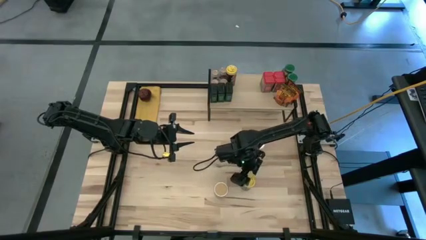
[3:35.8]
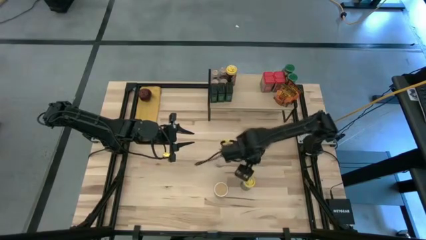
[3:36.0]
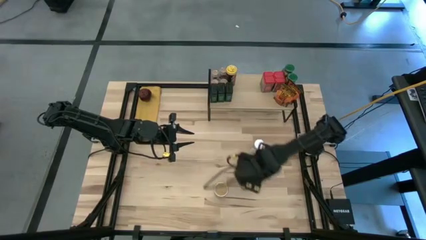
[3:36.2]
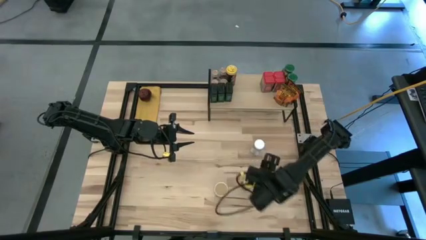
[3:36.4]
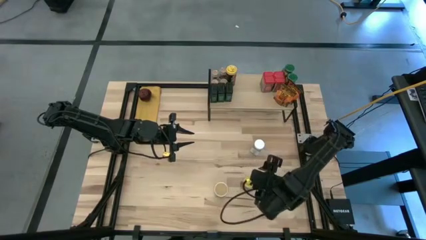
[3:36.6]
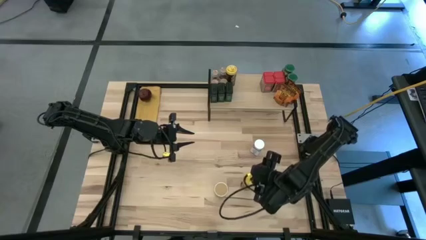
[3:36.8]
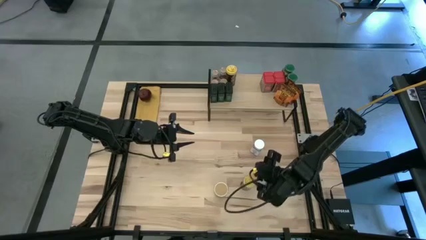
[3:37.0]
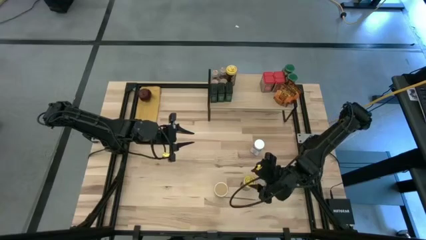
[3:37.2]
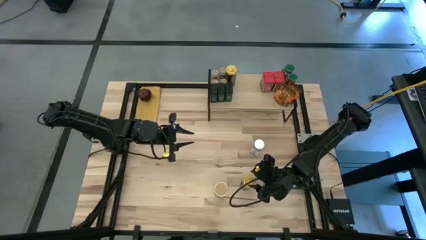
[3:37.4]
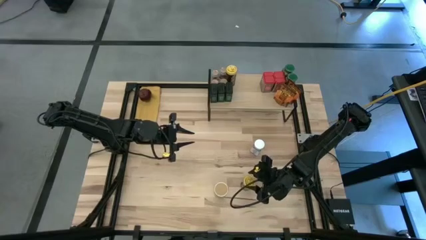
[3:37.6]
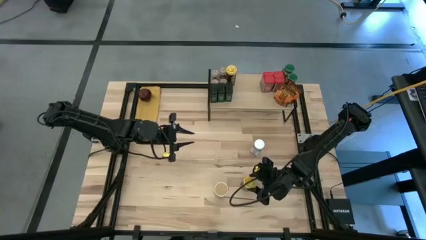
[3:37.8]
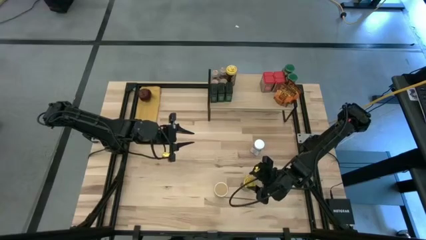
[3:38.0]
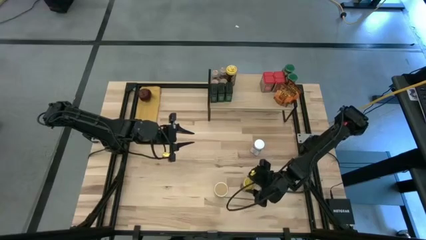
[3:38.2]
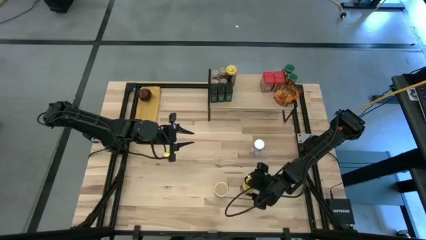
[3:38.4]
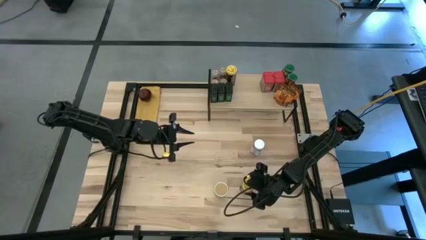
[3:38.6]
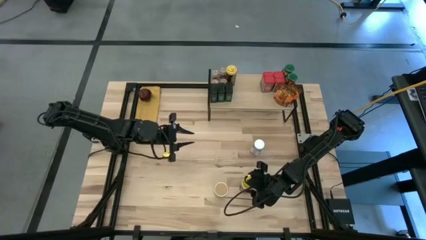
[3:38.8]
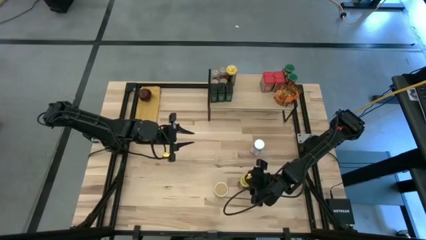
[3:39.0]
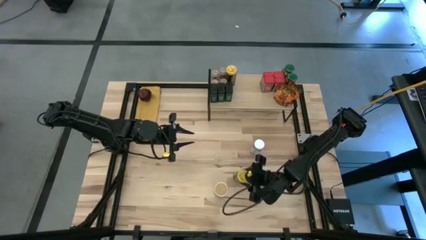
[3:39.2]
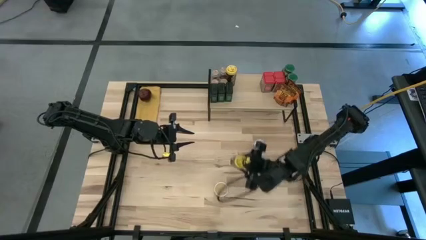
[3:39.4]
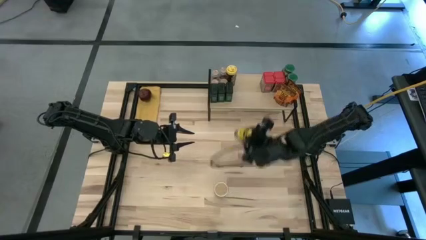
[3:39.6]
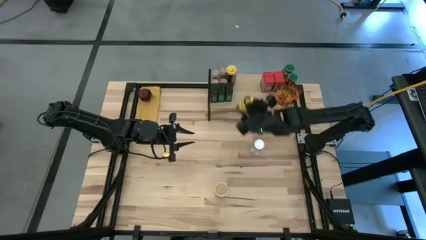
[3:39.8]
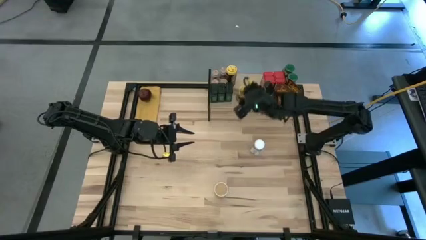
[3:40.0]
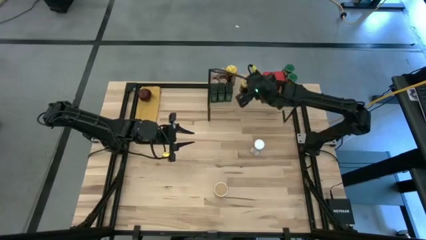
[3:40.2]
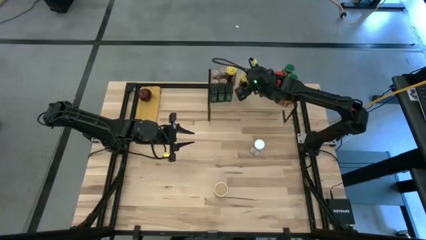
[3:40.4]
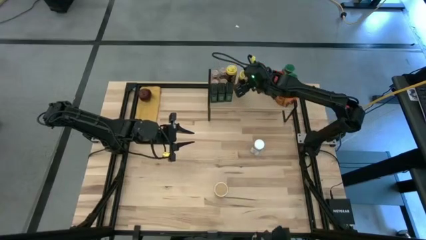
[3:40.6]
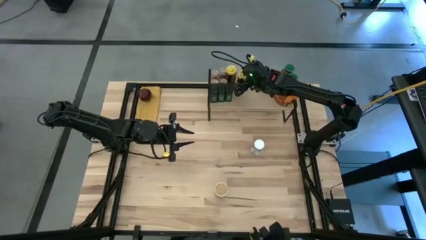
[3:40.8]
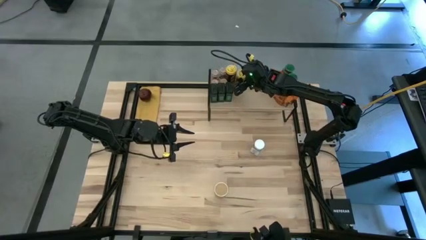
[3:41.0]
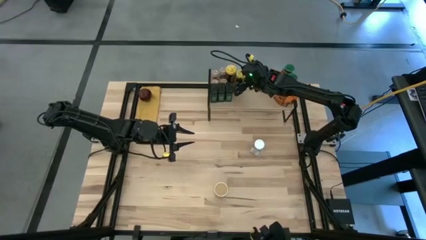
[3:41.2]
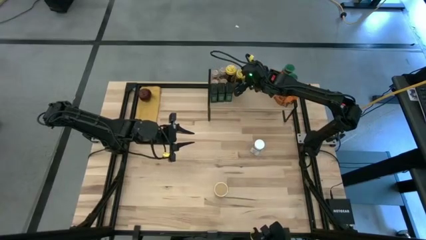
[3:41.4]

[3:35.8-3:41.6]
Task: Shelf spices
Put the yellow seasoning bottle on the shelf

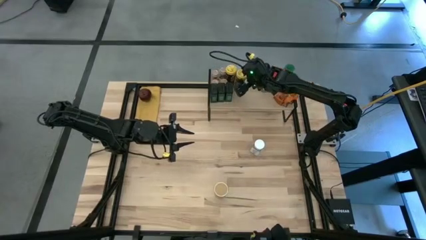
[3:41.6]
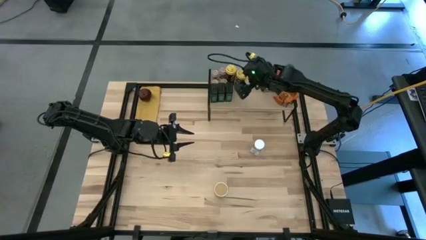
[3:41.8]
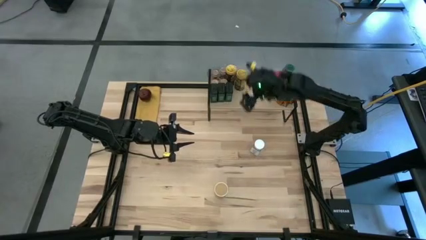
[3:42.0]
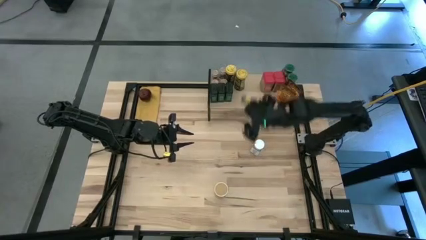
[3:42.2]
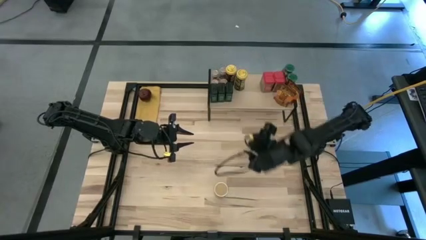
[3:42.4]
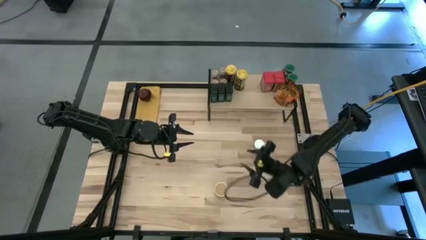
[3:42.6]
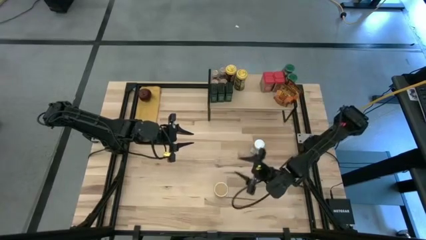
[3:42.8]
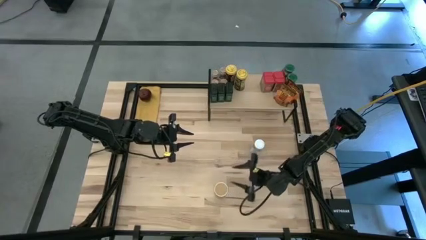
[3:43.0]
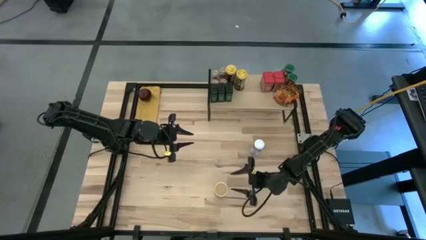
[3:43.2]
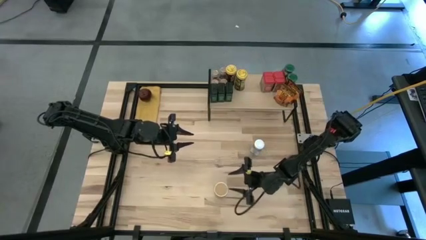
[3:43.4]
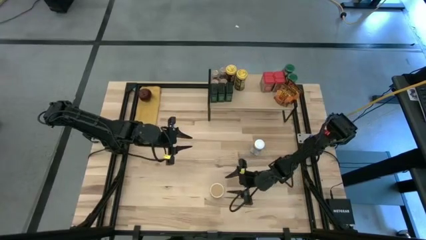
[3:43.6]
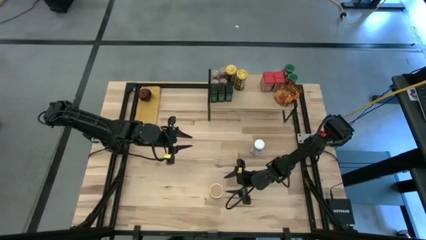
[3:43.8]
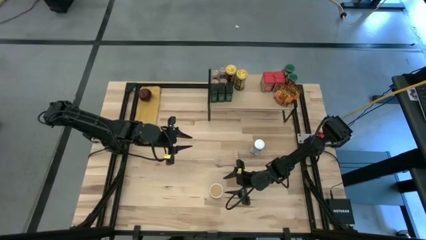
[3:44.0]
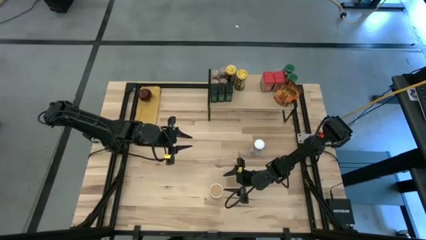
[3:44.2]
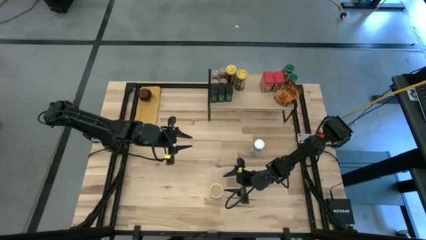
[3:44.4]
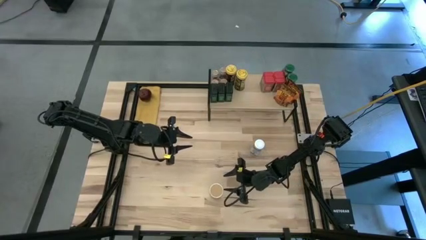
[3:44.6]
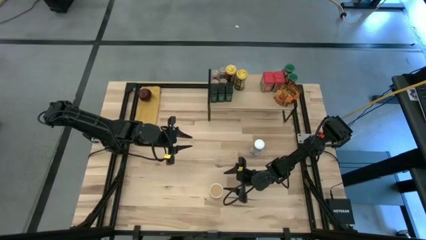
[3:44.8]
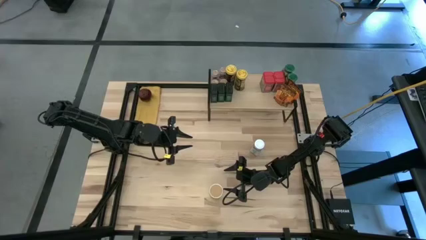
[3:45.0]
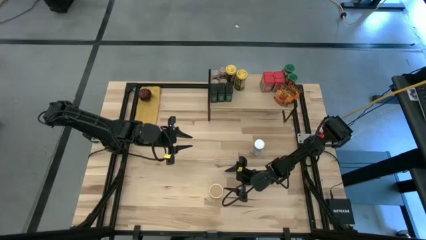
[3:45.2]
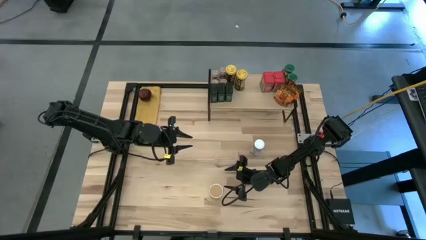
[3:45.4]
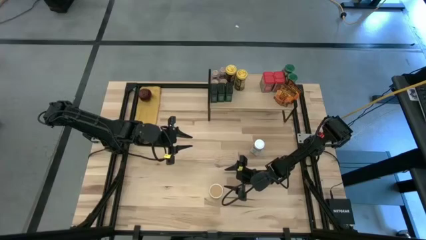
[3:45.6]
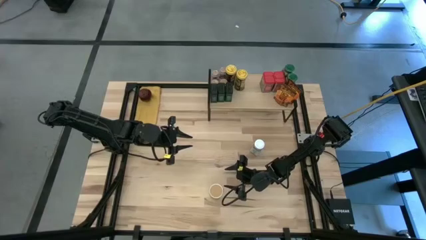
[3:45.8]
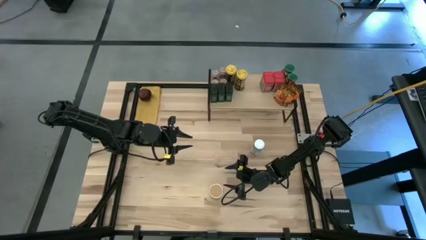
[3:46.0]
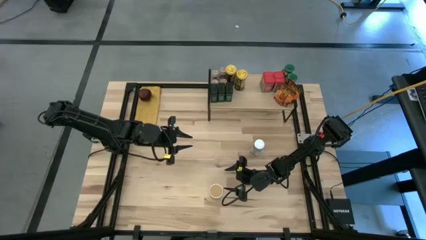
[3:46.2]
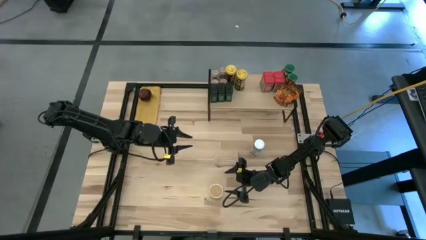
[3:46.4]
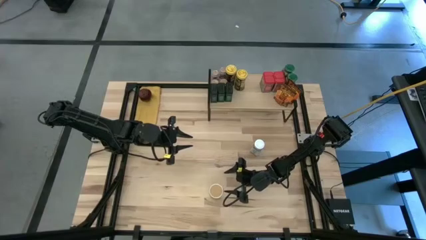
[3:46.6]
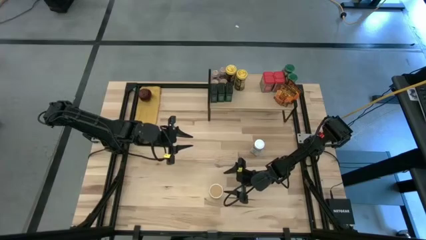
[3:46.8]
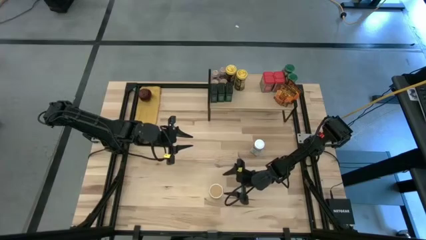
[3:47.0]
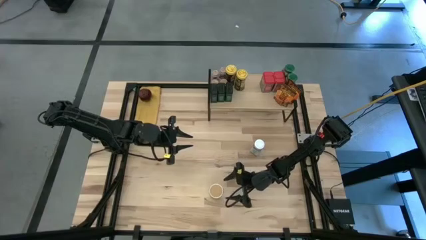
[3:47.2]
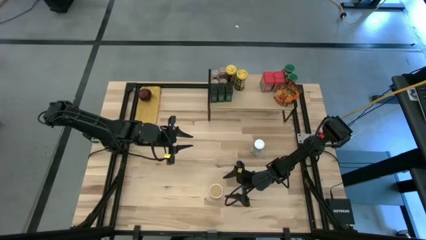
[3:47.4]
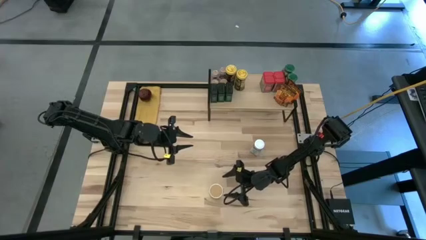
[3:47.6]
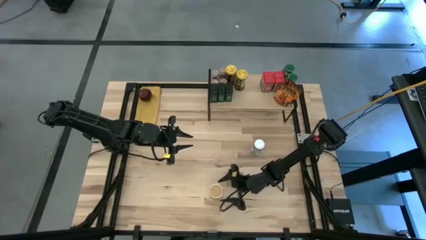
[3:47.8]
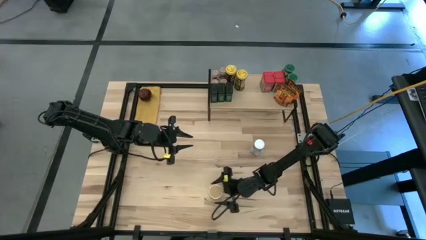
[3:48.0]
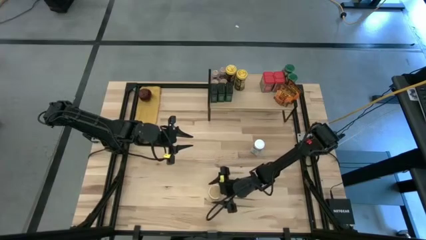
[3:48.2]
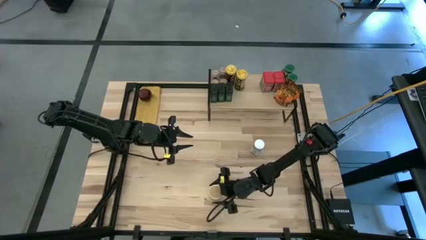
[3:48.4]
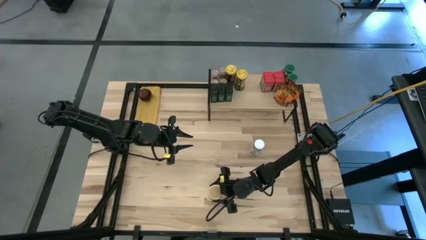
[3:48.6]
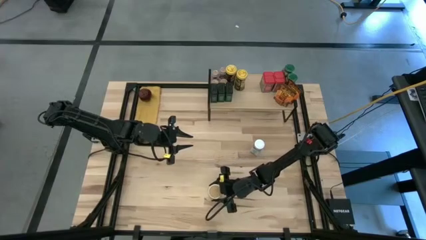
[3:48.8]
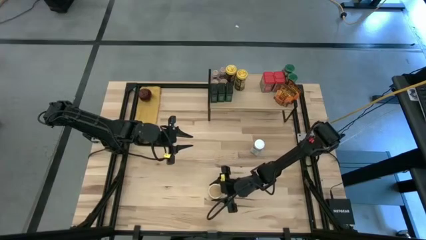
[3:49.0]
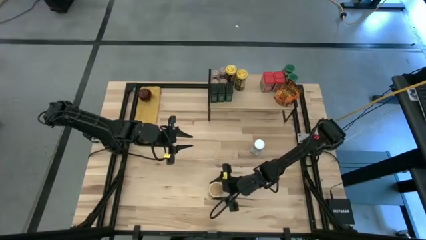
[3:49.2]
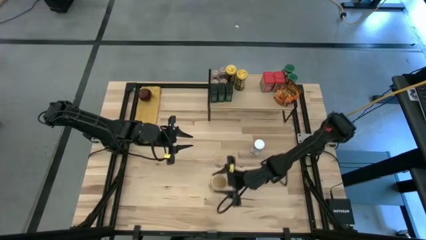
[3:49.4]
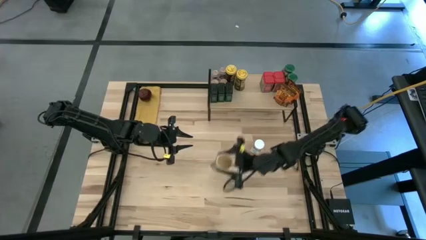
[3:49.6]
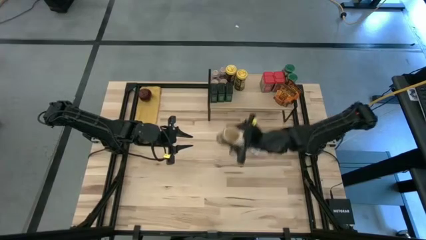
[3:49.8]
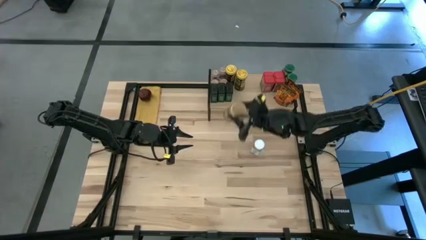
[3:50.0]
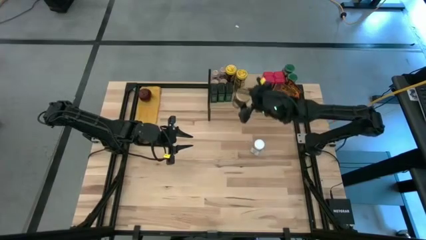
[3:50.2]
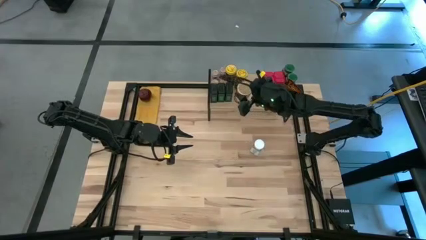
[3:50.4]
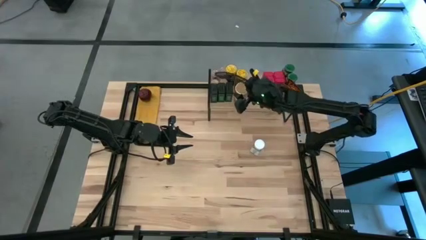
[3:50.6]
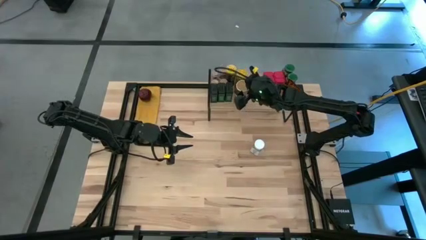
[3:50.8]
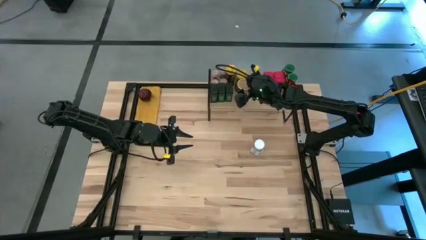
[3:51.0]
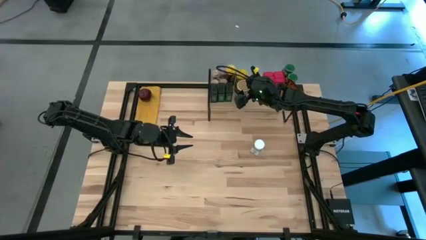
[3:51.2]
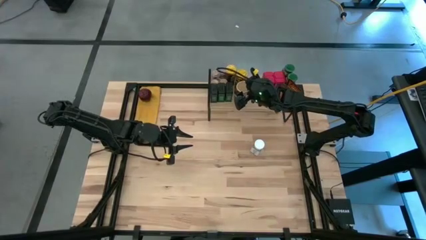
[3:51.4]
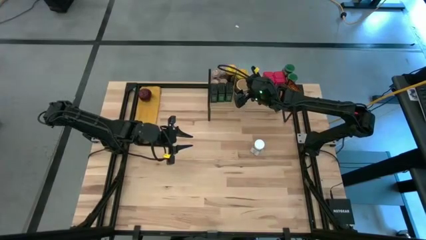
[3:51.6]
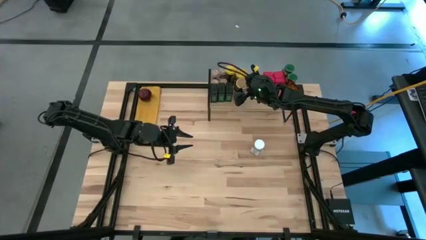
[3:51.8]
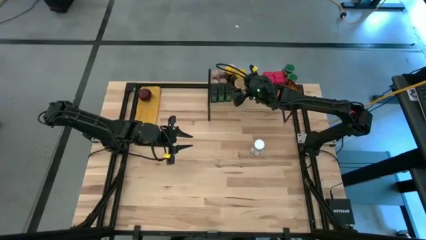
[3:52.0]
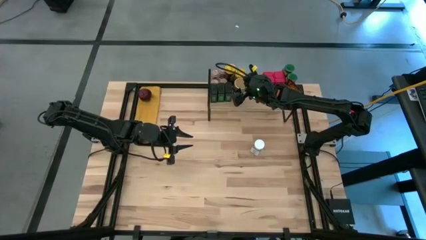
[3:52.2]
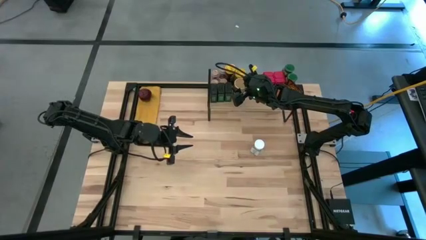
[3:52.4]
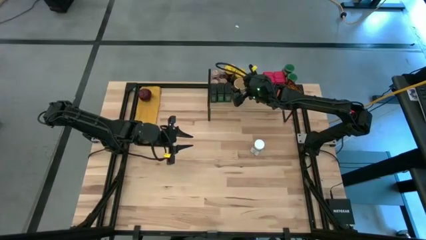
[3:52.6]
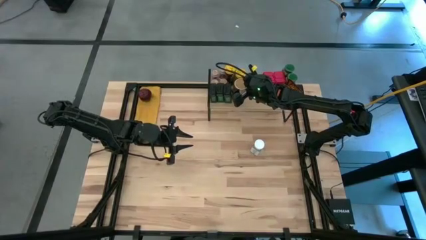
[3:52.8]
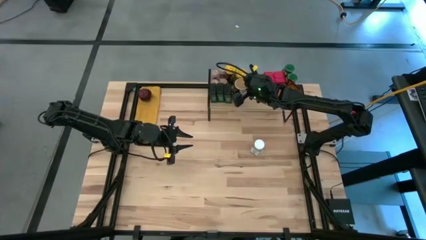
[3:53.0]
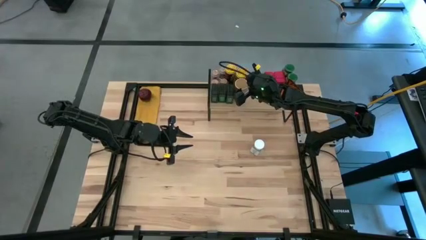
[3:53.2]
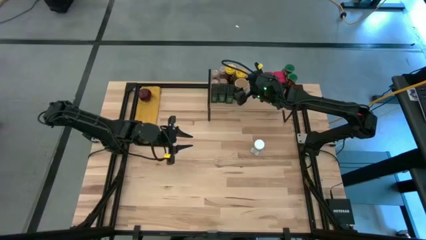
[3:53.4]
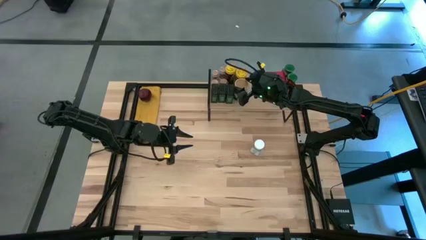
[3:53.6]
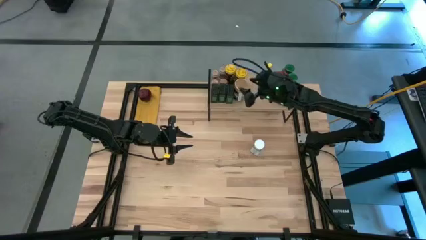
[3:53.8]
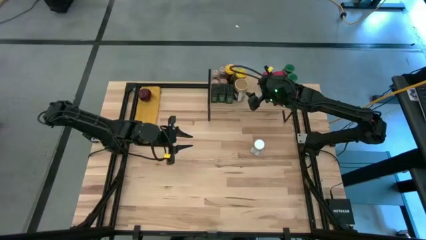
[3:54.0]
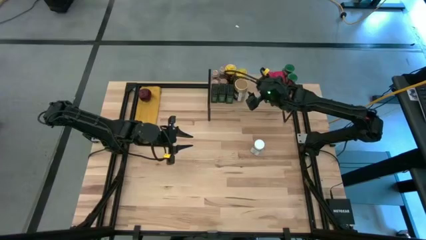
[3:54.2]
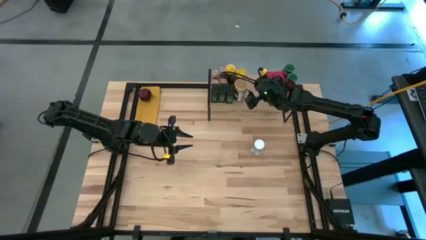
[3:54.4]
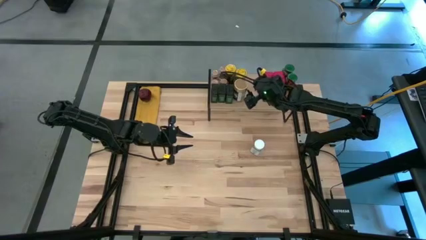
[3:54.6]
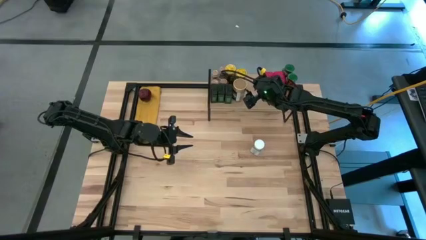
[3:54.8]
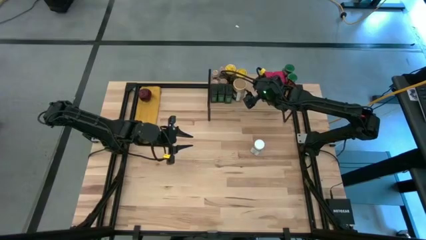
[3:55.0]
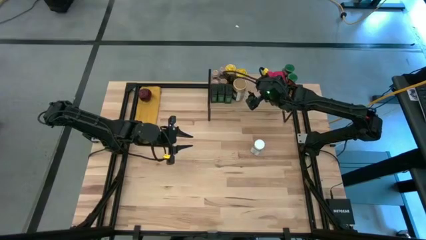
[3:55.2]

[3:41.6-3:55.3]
Put the golden seasoning bottle on the shelf
